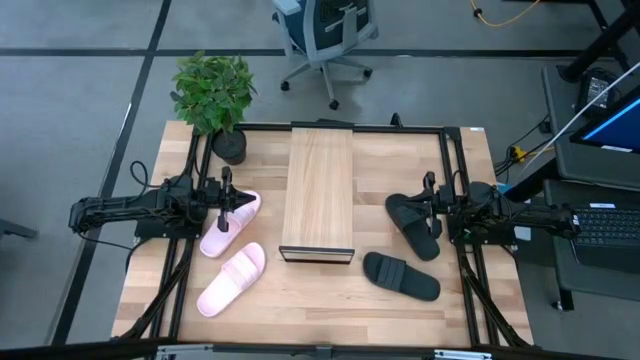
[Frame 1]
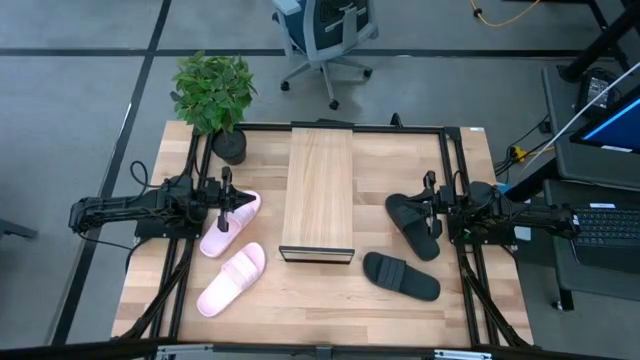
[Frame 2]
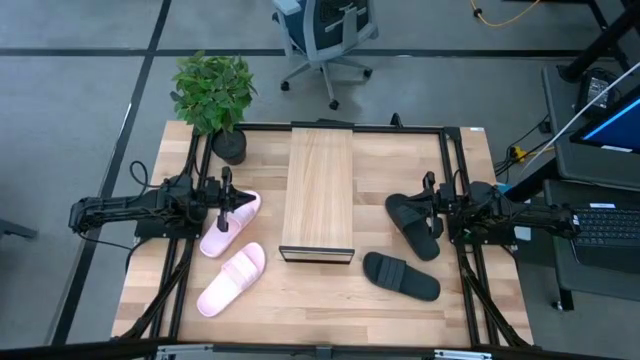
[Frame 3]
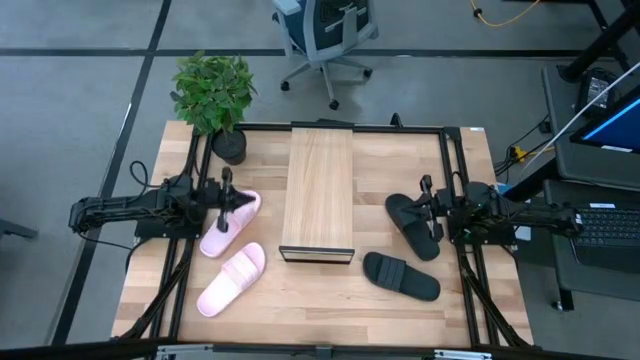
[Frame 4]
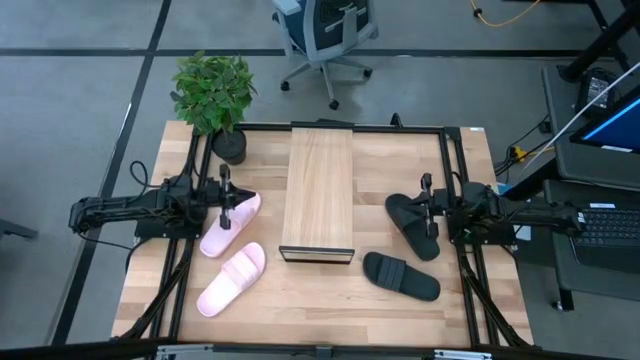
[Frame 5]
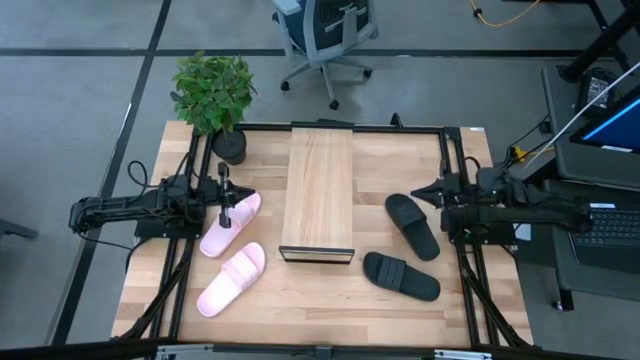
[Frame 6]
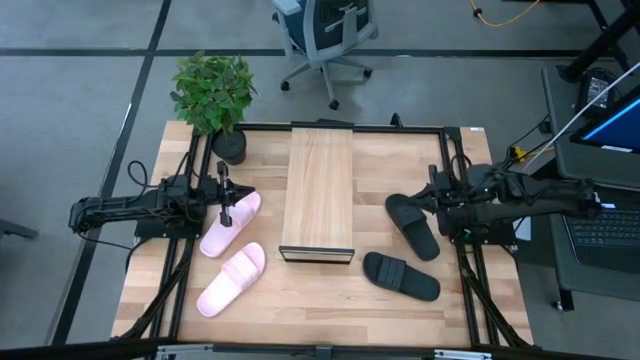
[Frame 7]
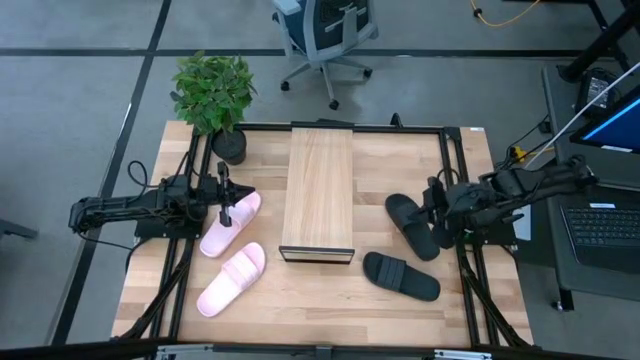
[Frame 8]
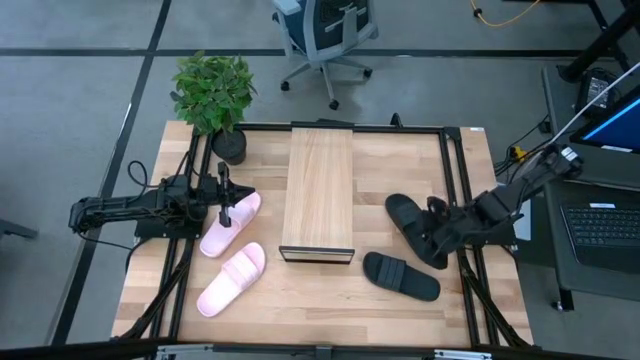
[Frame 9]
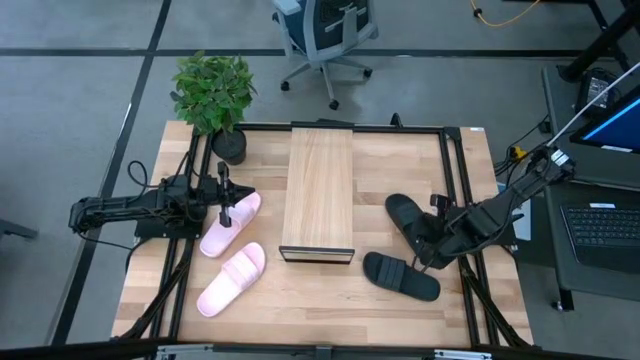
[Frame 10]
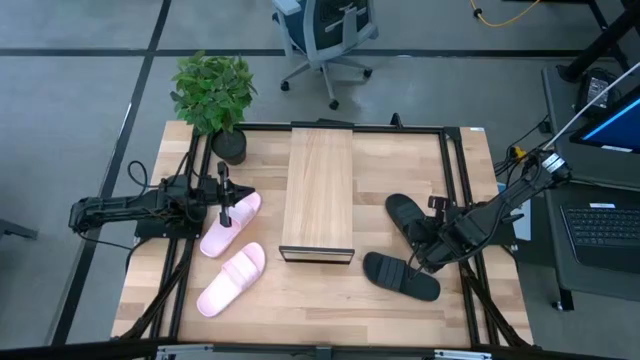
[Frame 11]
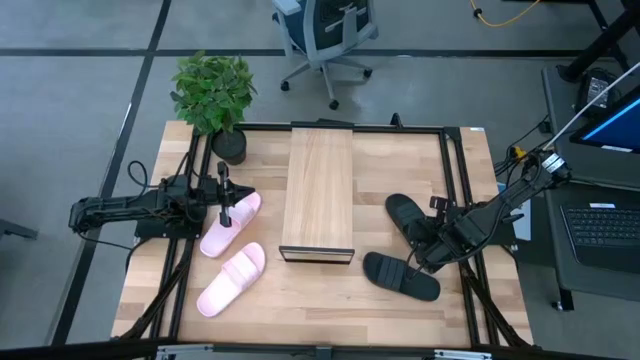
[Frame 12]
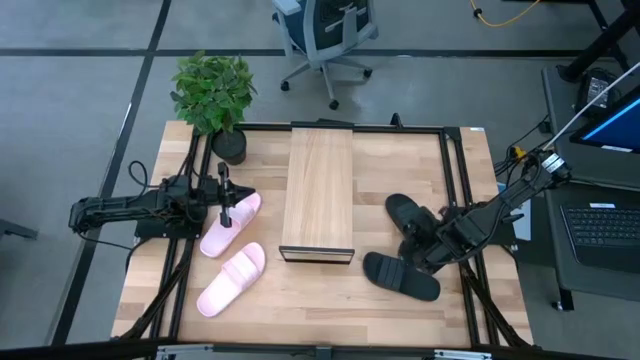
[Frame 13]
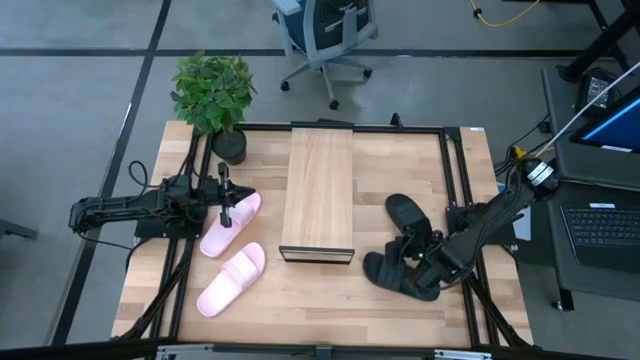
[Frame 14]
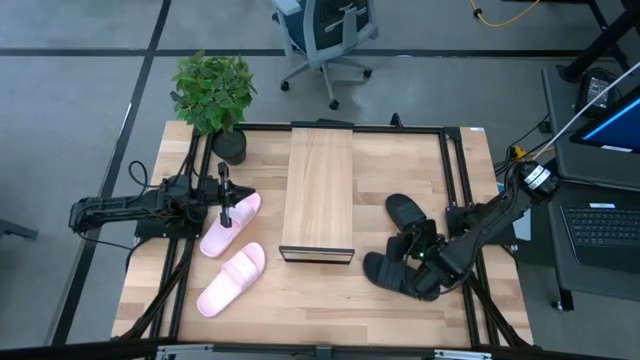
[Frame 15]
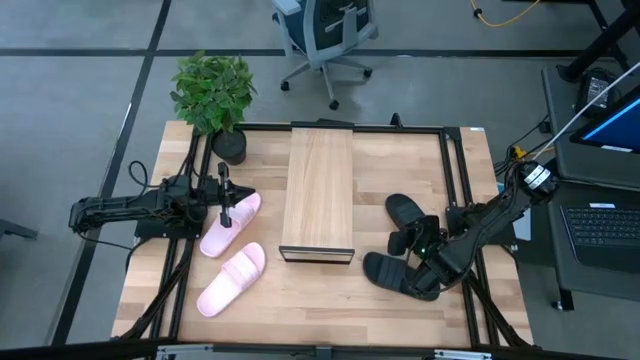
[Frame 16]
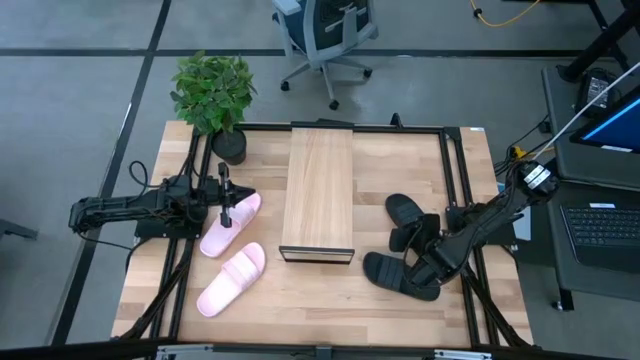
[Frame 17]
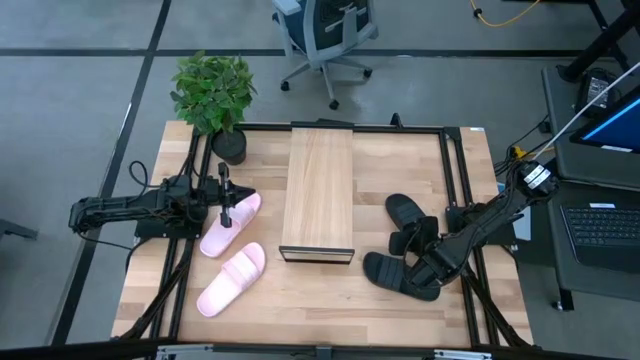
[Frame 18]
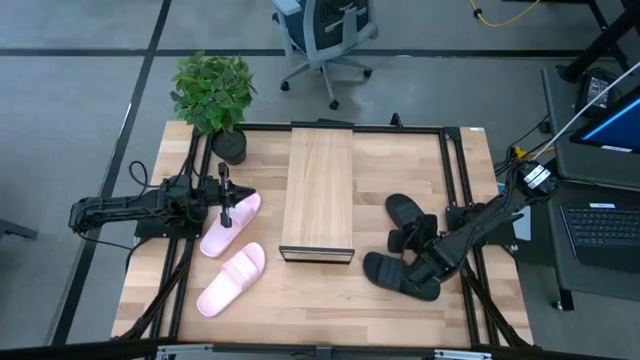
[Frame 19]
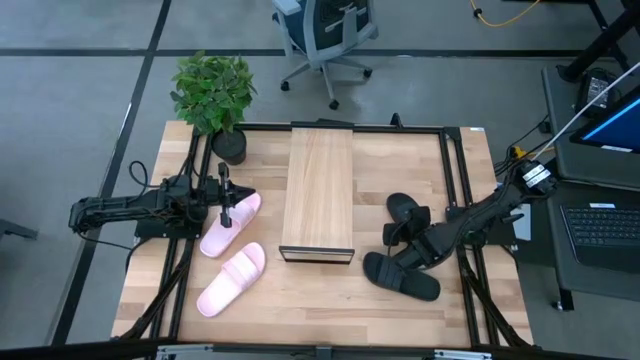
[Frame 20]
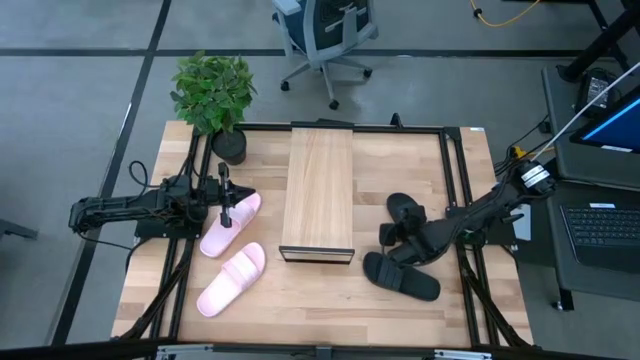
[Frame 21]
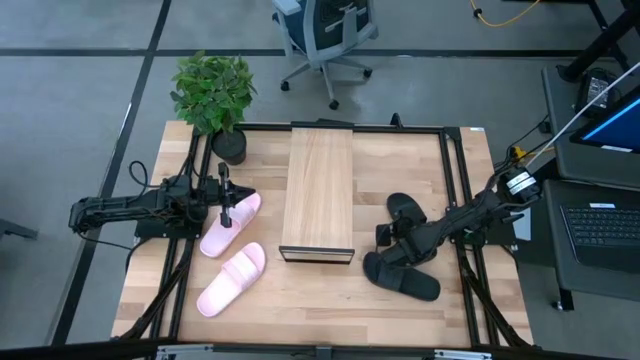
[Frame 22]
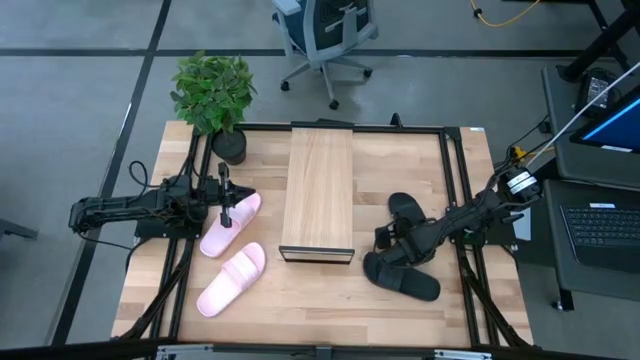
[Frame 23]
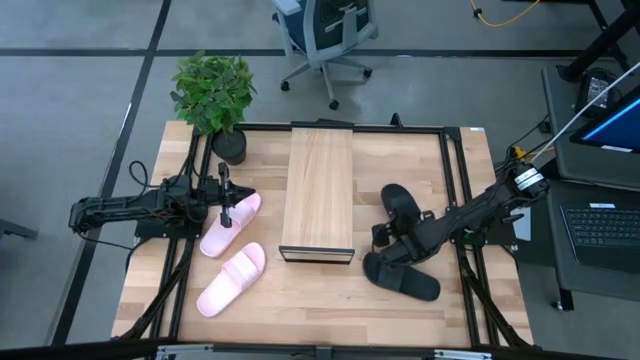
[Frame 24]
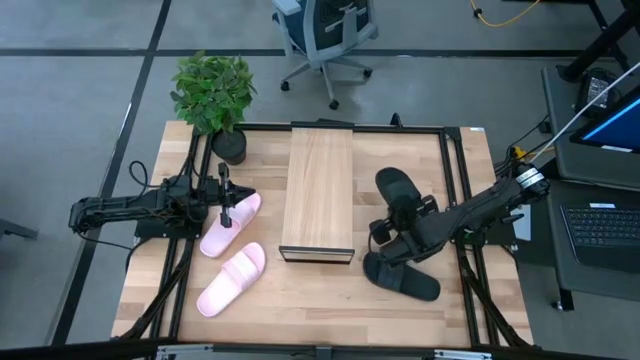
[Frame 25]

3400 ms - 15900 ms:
Task: Pick and place slides into the shelf
Put the top black slide on the shelf

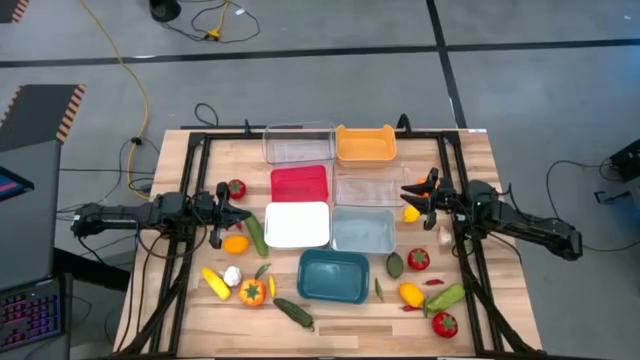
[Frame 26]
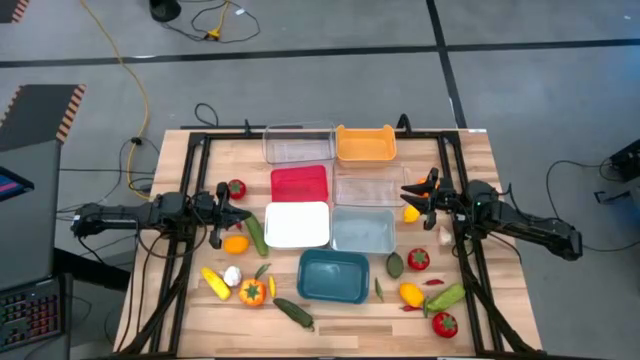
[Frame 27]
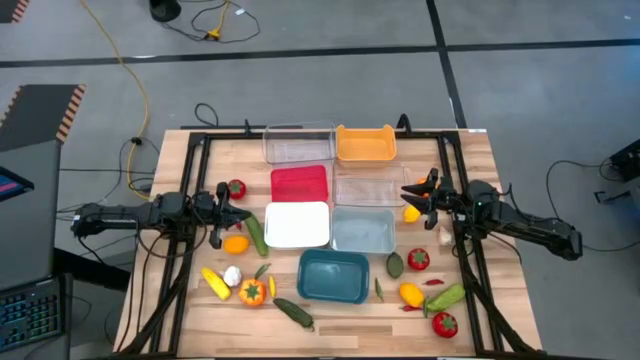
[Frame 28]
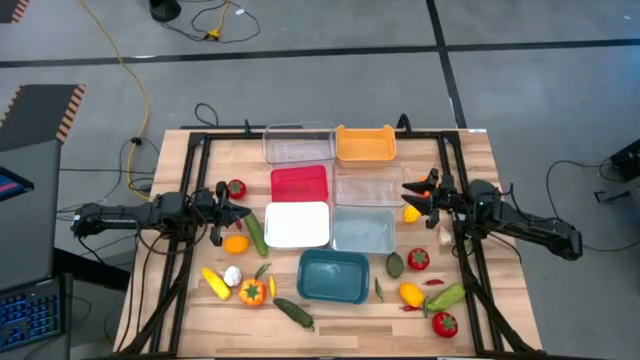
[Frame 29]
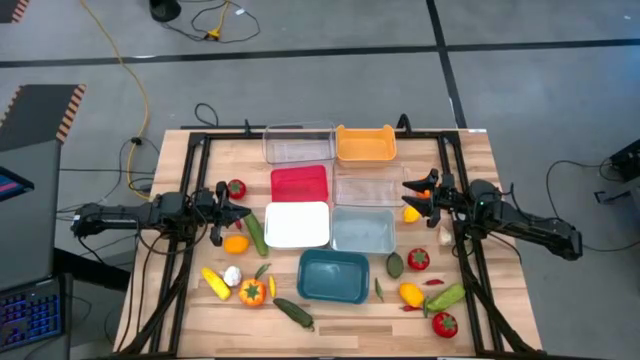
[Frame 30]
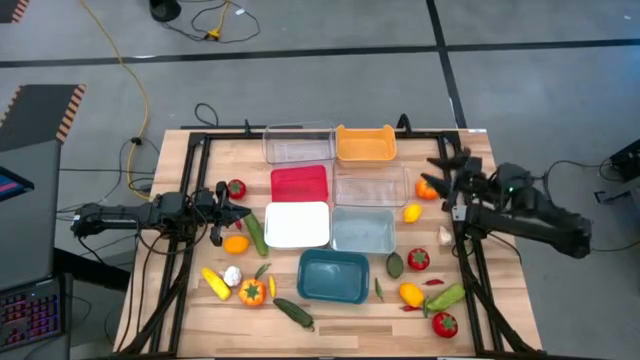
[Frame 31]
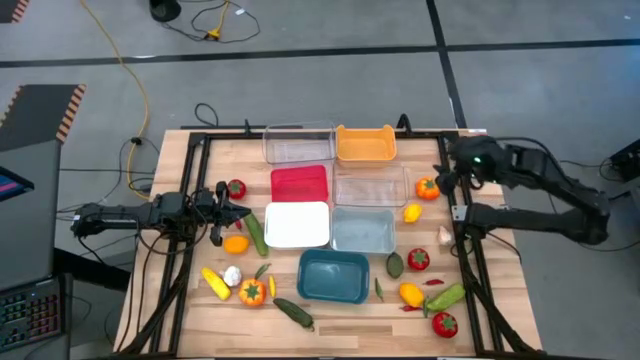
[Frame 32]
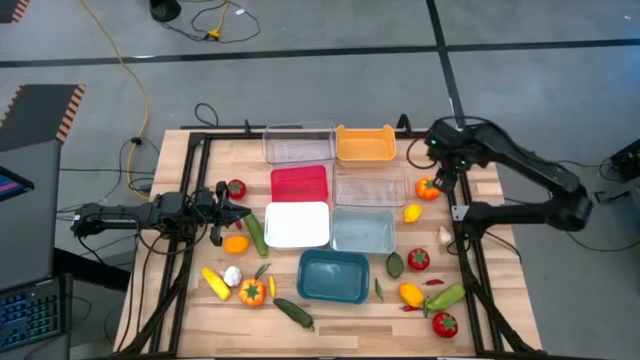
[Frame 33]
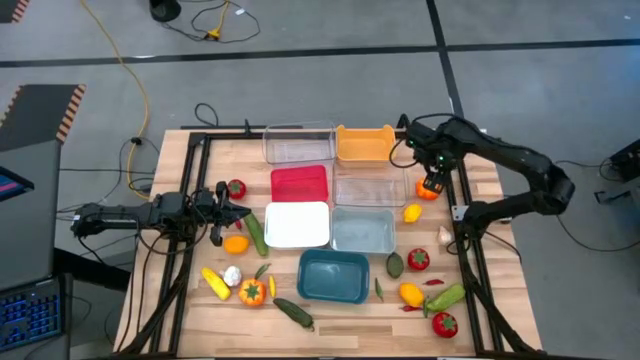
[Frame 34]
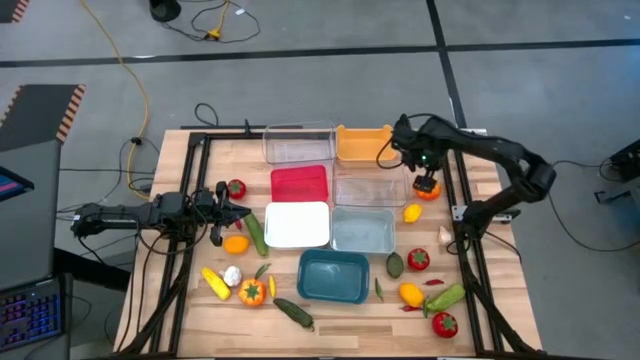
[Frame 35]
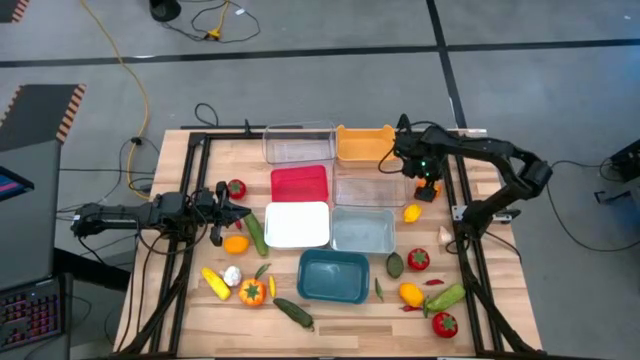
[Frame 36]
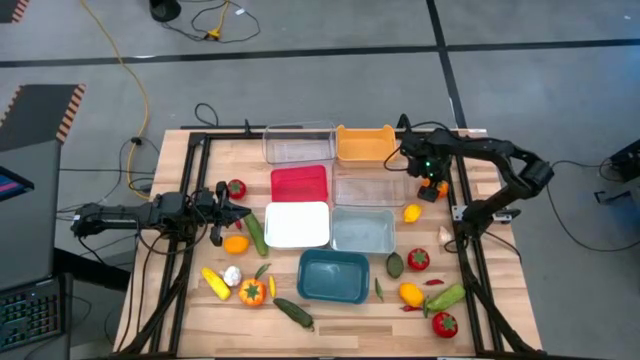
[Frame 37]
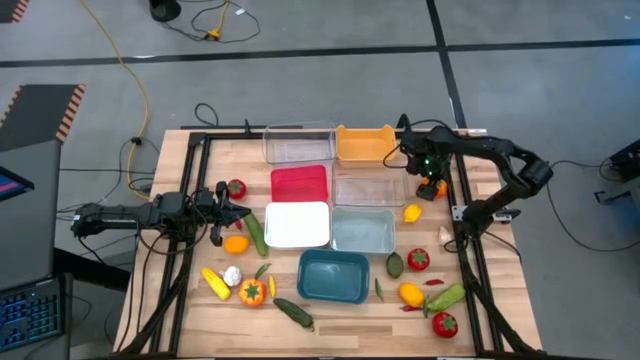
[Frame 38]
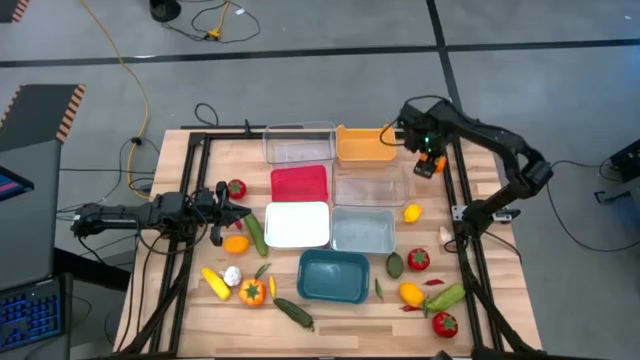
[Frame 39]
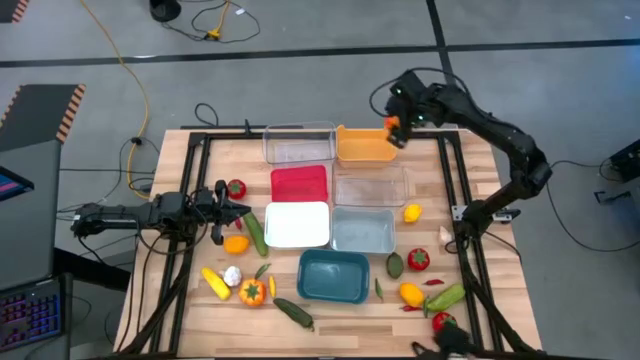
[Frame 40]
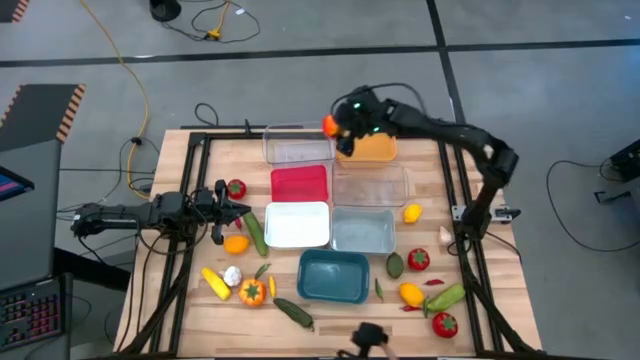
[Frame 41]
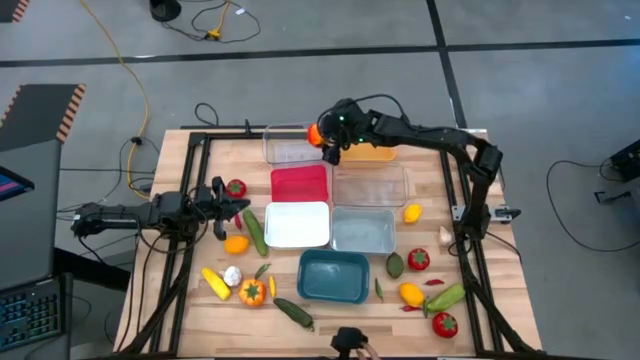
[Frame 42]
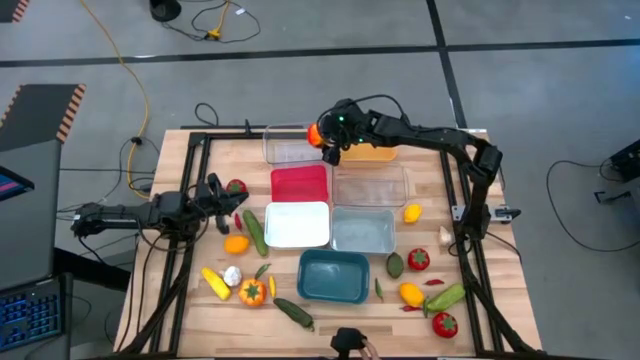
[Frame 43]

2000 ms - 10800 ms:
Task: Sort produce into baskets
Put the right orange tomato into the top transparent bin
